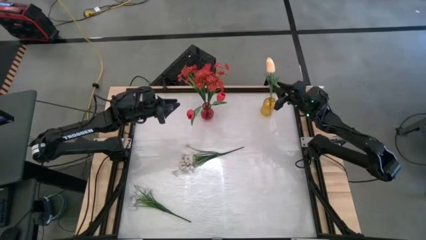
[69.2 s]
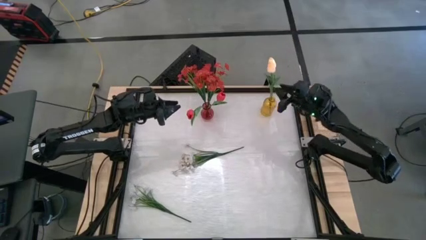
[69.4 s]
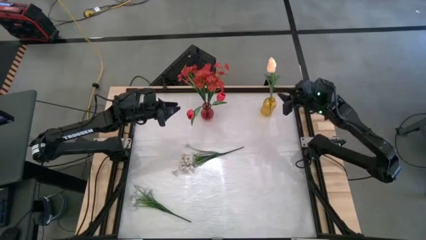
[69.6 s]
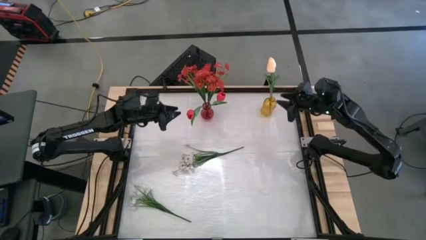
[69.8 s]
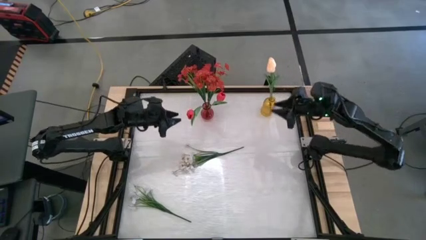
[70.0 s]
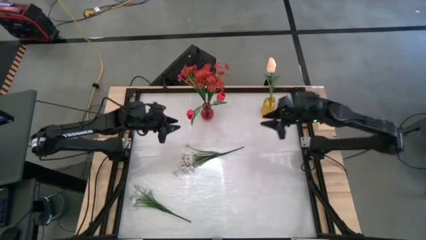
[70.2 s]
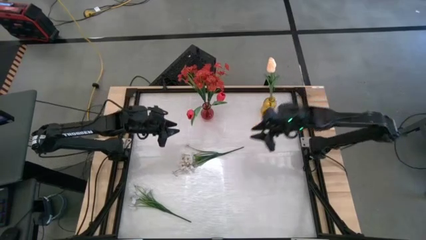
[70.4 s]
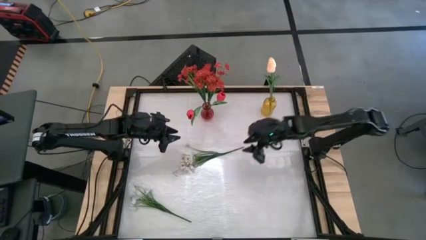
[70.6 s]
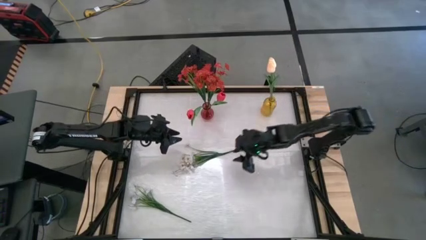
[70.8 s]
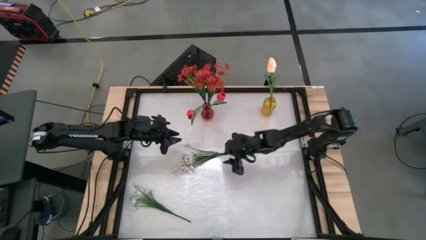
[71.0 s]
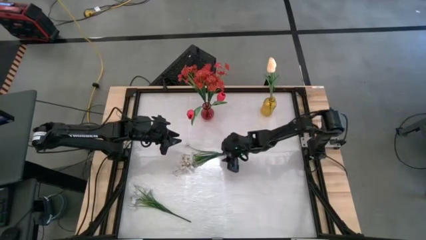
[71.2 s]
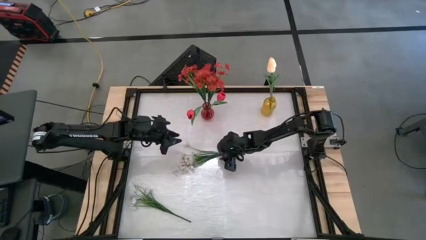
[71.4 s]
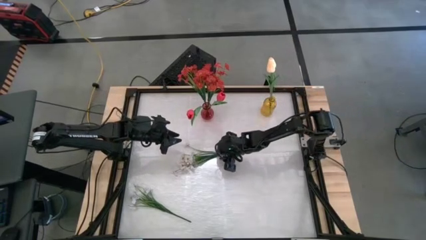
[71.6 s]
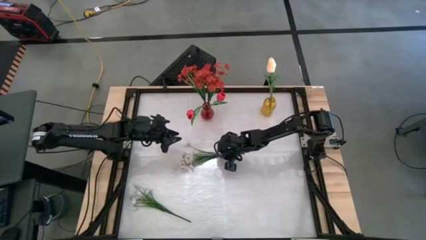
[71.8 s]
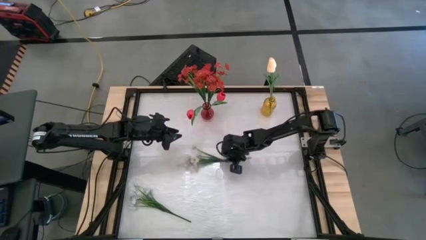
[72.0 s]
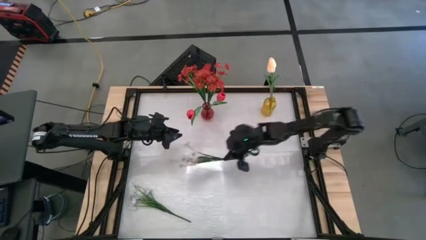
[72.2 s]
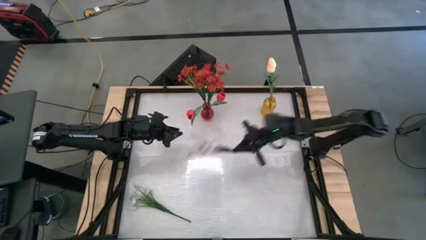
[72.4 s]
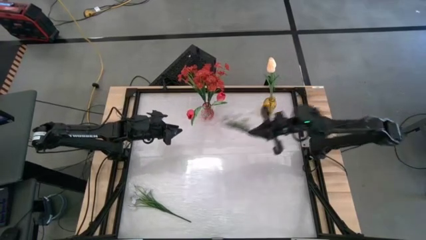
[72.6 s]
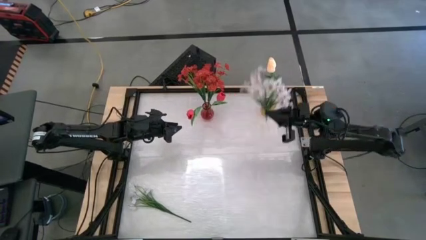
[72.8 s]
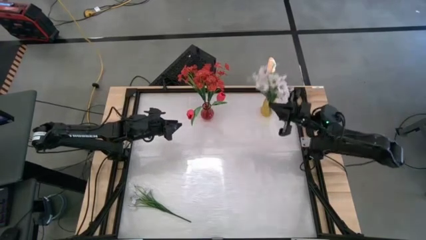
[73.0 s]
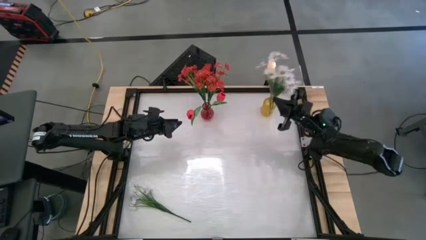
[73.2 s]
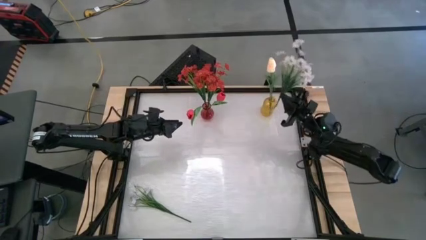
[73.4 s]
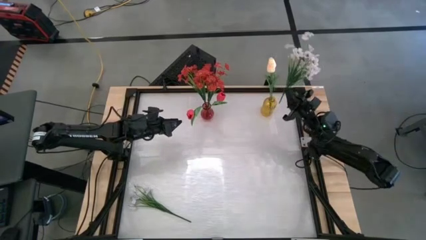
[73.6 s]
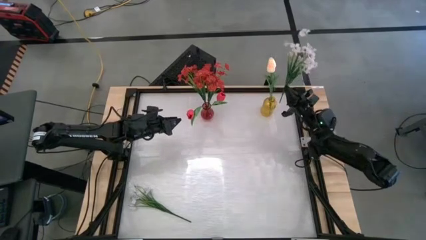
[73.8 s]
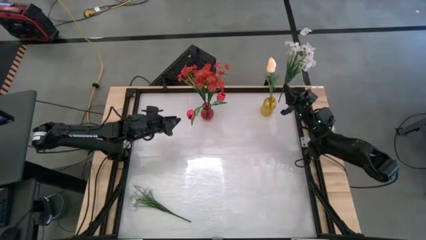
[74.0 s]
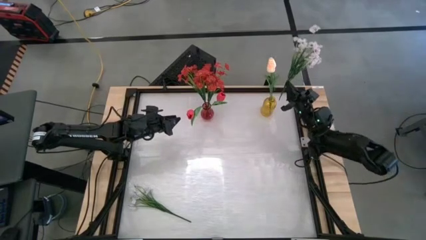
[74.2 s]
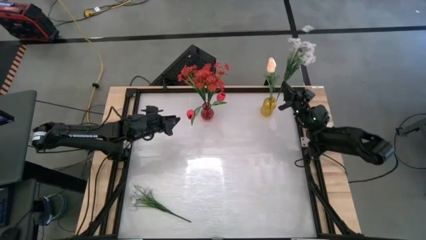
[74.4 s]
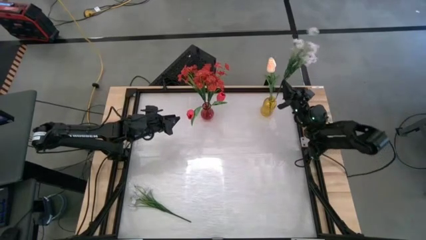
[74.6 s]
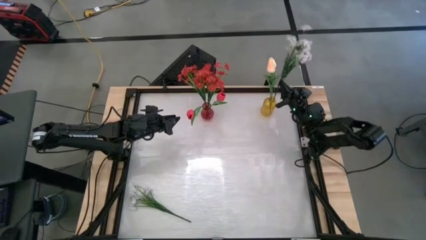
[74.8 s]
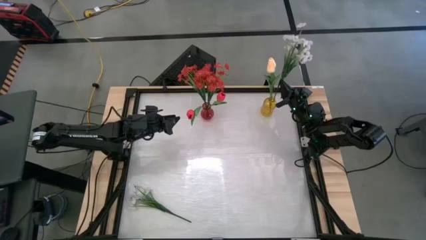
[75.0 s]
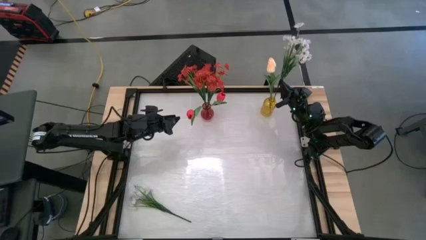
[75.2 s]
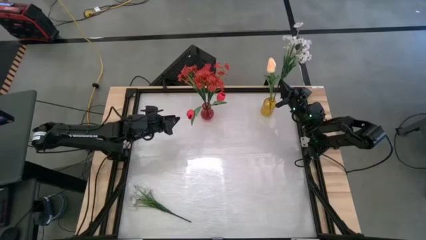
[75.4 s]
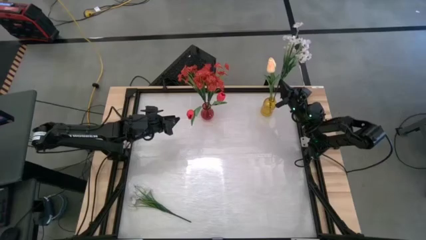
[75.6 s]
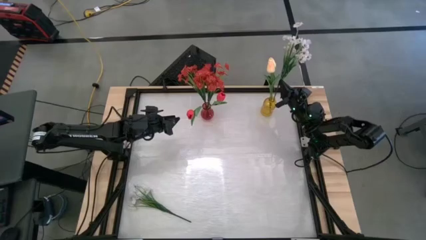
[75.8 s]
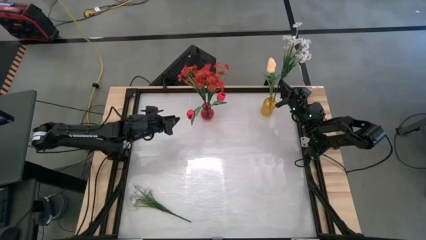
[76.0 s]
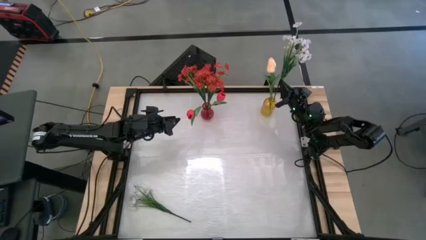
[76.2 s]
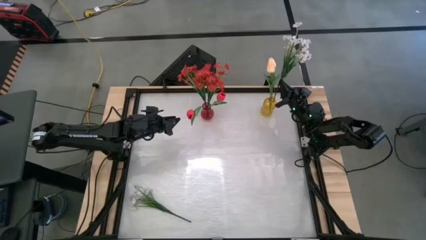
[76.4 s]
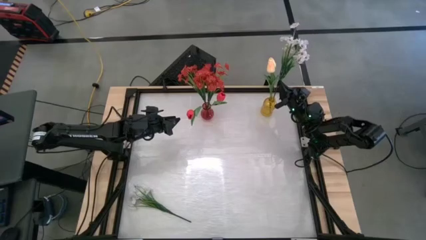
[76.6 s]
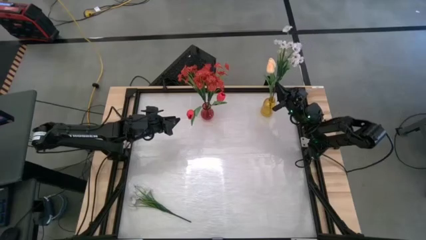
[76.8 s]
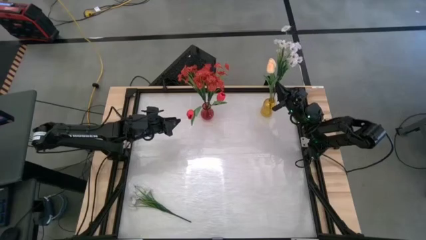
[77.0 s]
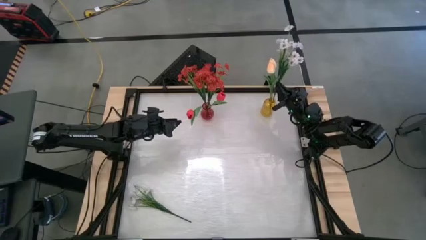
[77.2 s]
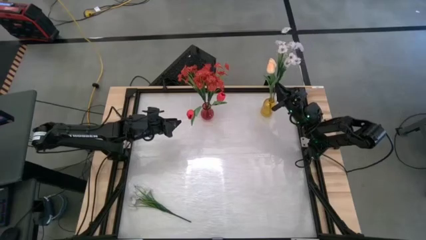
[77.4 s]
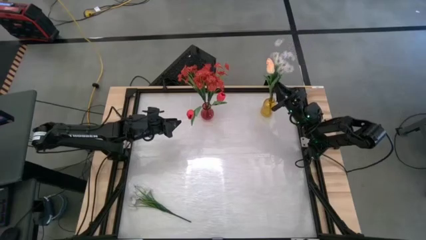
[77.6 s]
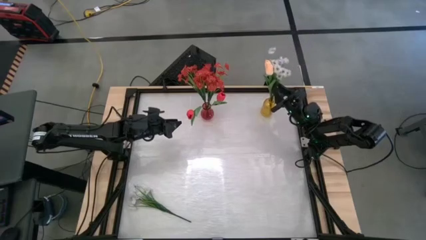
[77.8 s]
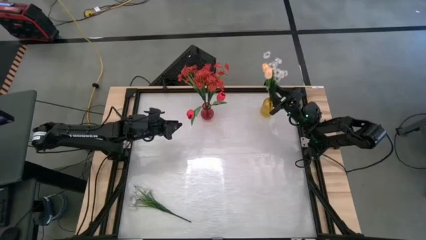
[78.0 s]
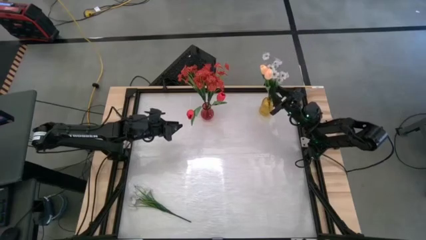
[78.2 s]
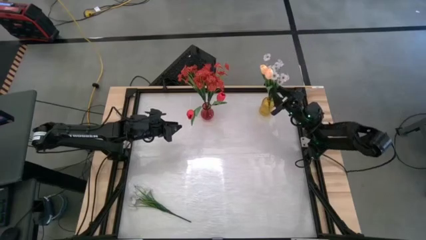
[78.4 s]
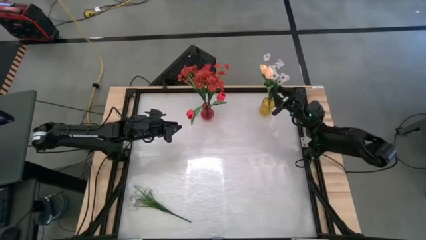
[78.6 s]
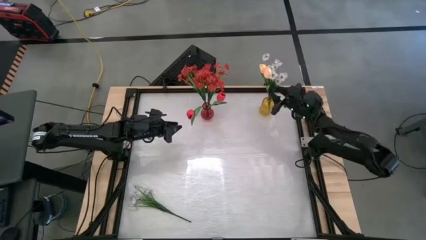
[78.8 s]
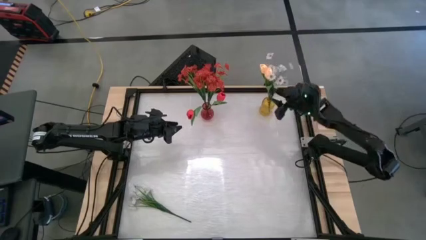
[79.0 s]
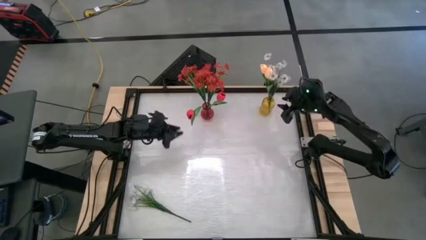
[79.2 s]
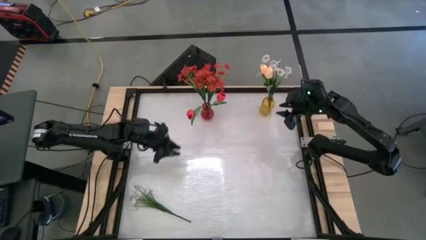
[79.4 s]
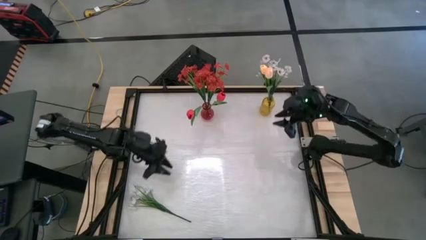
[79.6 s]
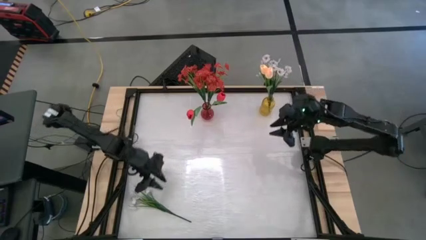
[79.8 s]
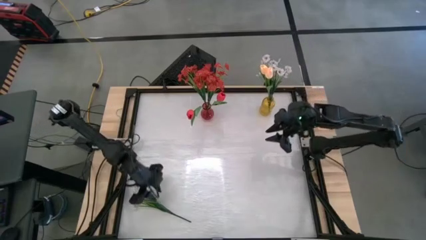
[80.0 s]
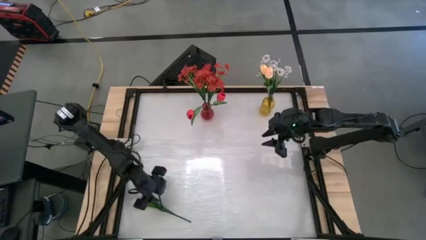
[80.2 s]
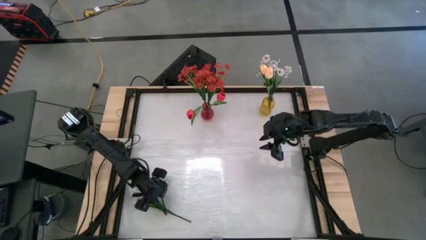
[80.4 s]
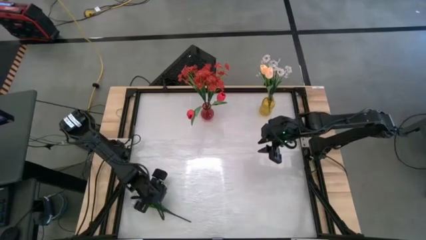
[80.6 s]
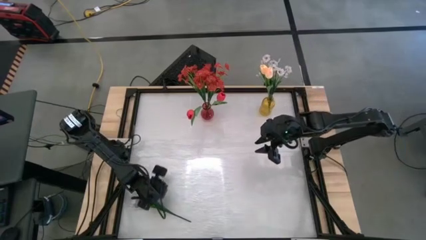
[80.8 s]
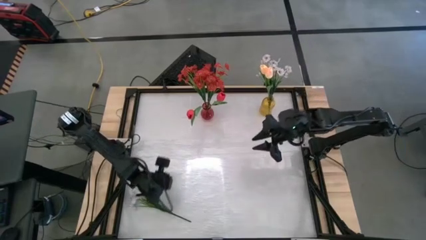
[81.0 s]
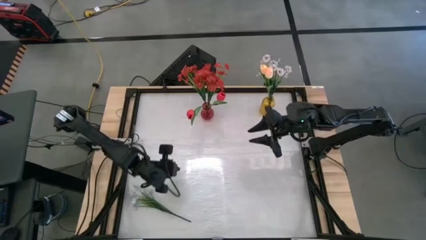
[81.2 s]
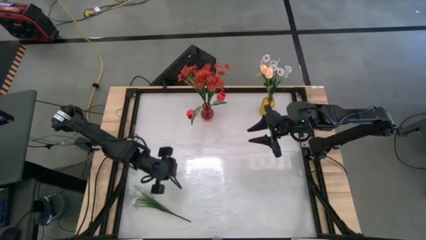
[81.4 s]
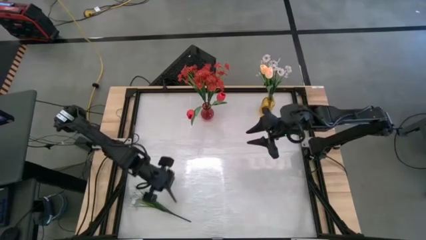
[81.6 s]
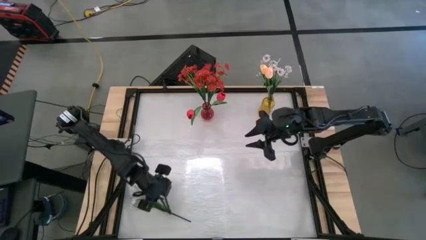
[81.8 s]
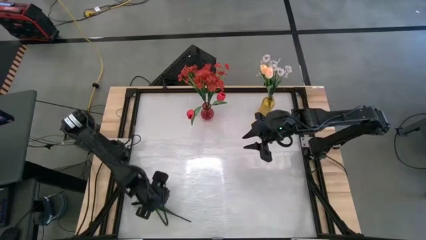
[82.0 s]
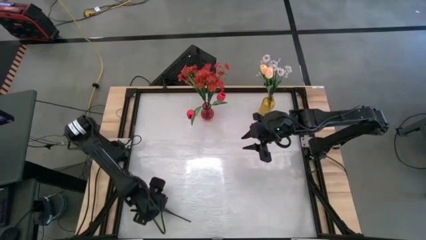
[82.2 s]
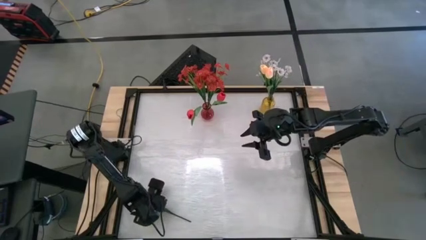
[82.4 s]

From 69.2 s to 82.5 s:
Task: Sort flowers into vase by color
Put the top white flowers into the yellow vase

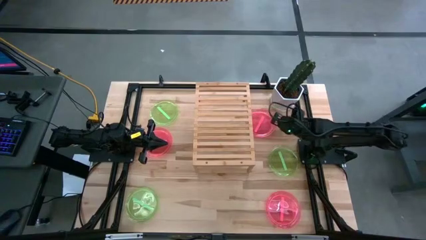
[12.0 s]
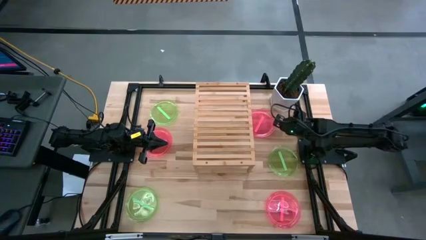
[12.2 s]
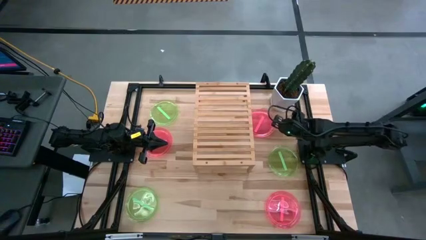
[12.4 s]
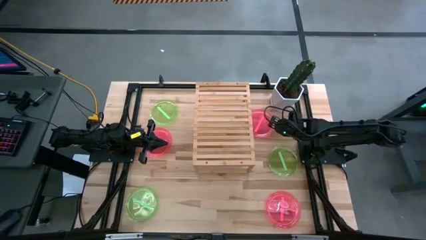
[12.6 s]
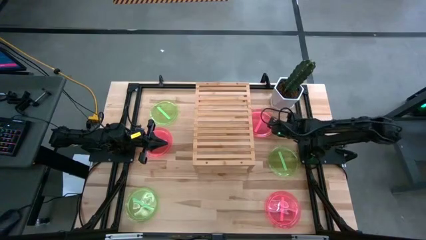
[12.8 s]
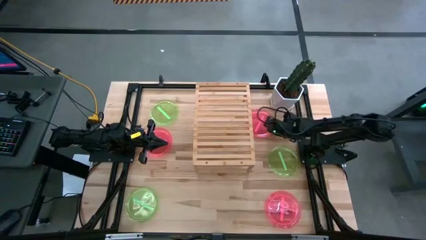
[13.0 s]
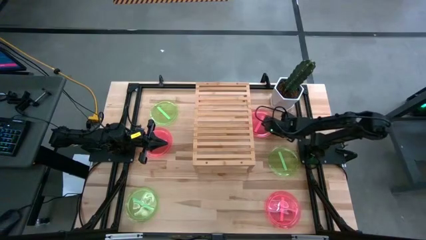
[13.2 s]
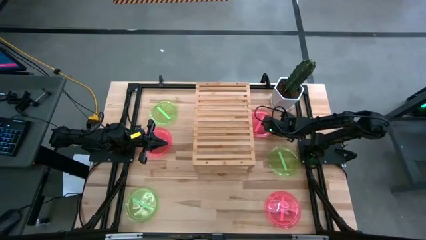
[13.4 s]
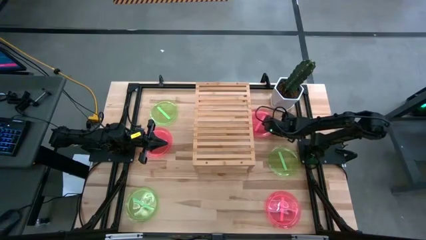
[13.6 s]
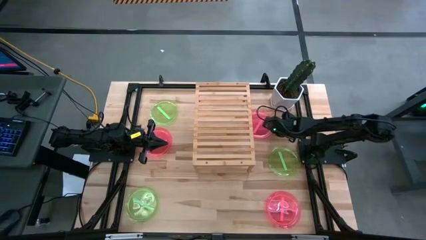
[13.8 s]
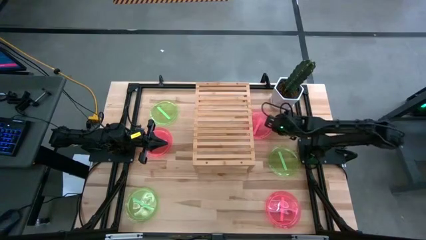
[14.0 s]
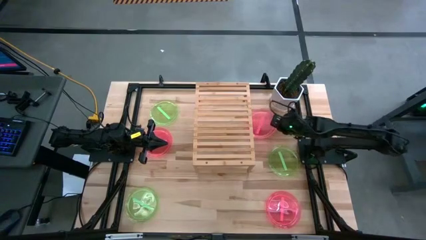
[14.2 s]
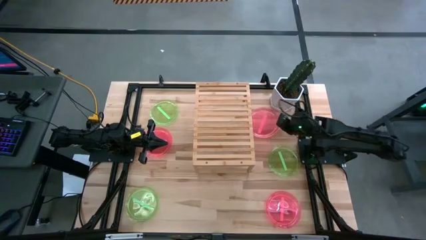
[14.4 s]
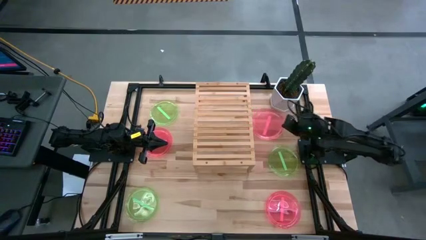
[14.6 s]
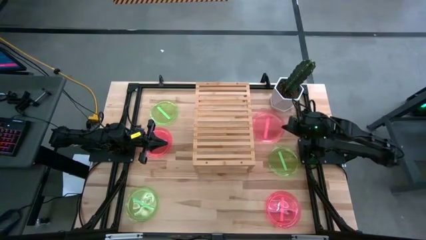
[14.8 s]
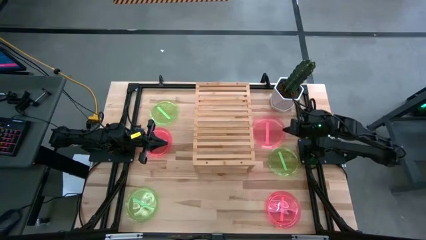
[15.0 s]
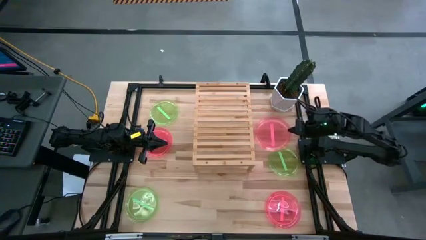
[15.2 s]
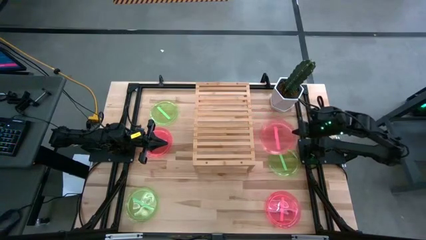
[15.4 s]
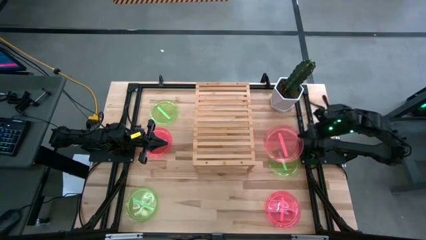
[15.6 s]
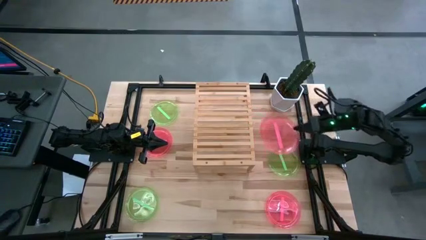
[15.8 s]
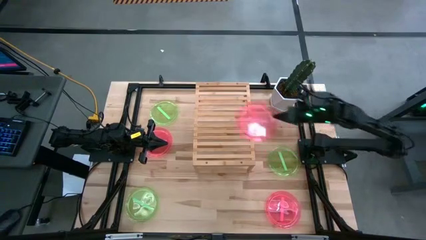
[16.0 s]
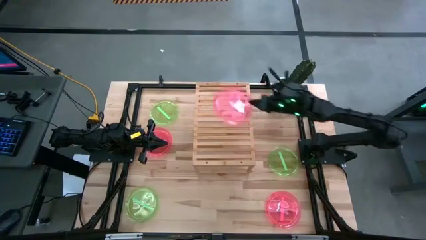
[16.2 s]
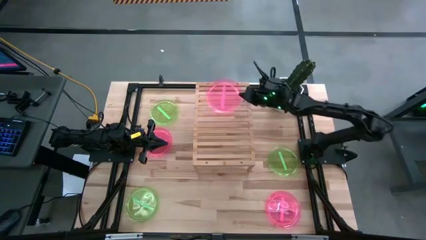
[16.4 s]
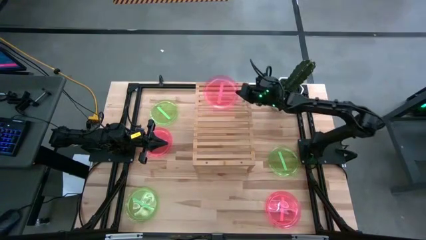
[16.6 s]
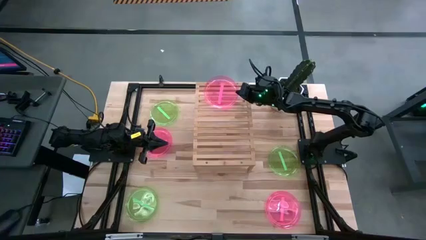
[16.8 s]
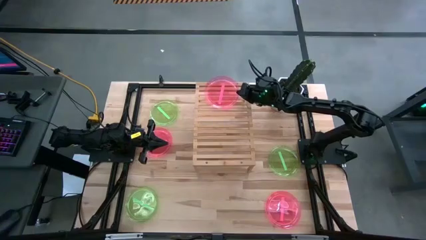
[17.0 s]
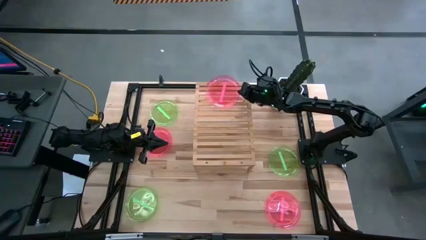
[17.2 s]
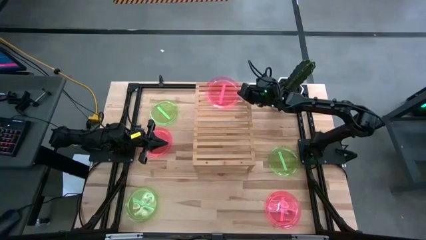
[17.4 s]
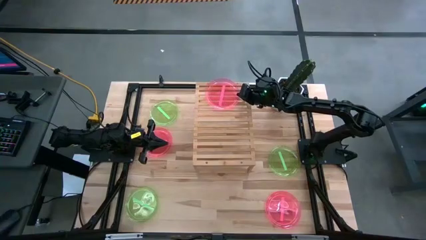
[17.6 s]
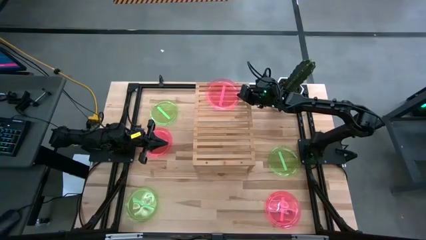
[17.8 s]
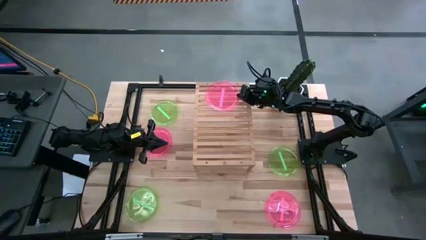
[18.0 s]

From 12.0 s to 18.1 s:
Task: Place and stack plates onto a shelf
Put the top right pink transparent plate on the shelf
